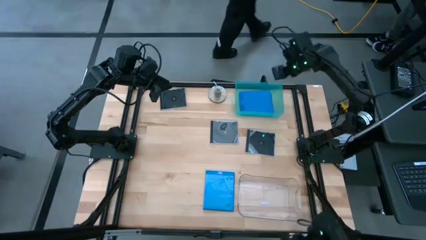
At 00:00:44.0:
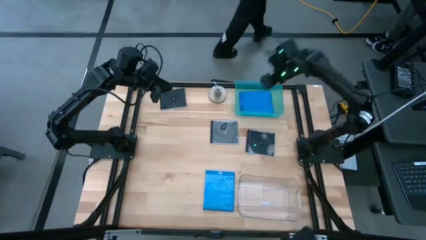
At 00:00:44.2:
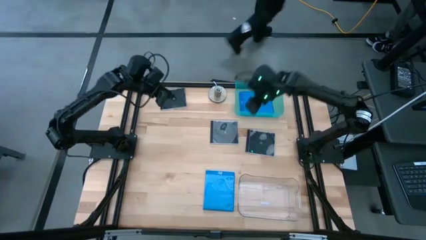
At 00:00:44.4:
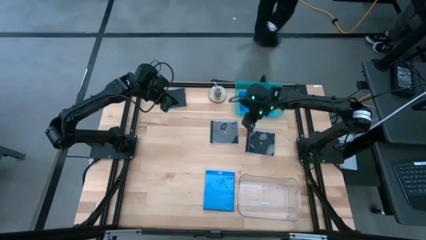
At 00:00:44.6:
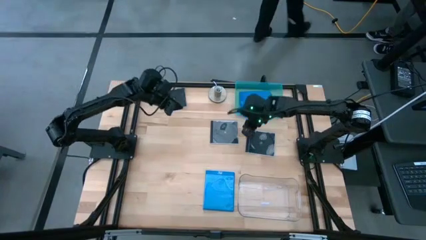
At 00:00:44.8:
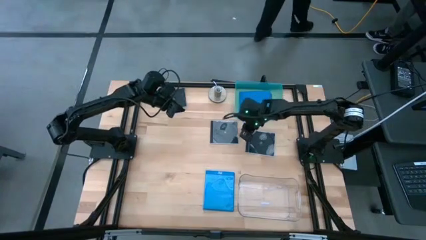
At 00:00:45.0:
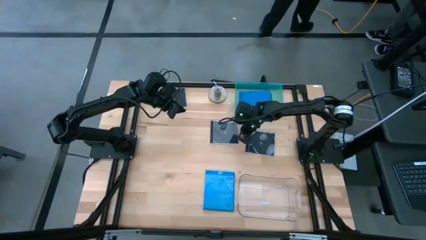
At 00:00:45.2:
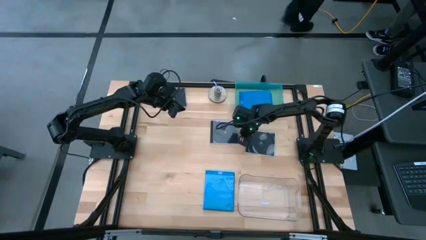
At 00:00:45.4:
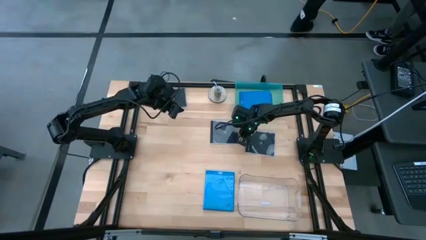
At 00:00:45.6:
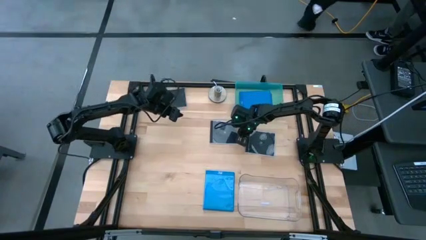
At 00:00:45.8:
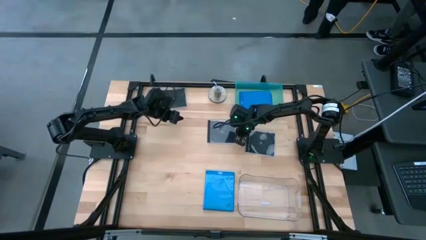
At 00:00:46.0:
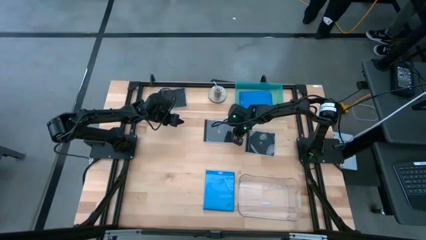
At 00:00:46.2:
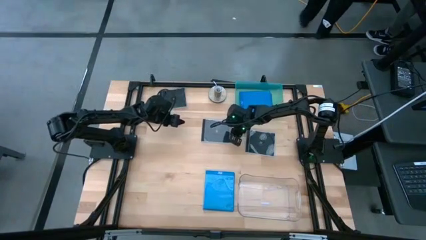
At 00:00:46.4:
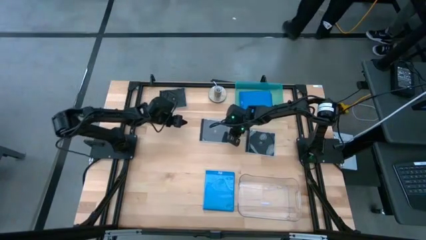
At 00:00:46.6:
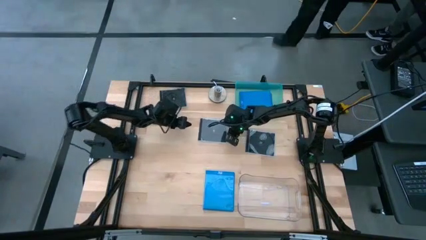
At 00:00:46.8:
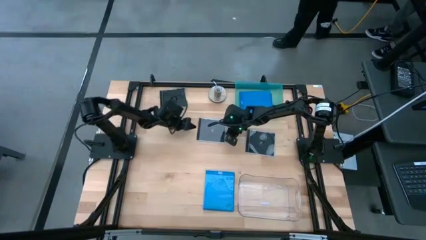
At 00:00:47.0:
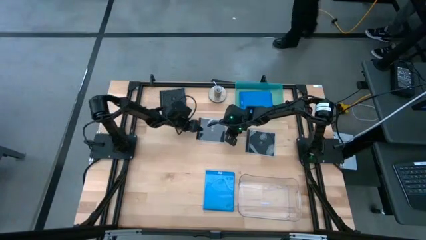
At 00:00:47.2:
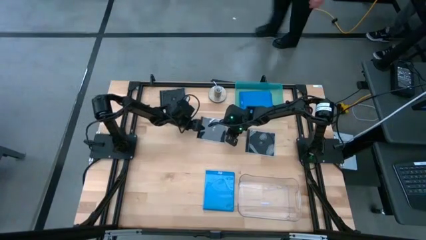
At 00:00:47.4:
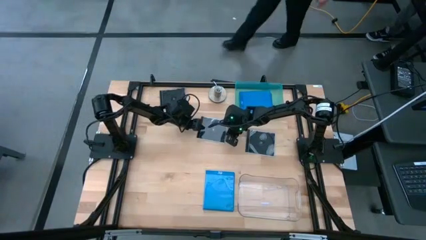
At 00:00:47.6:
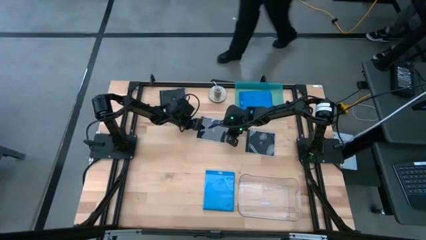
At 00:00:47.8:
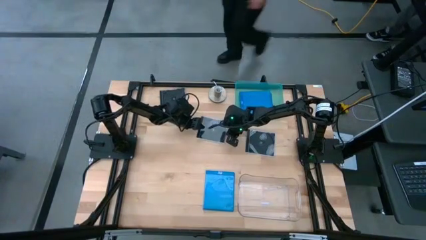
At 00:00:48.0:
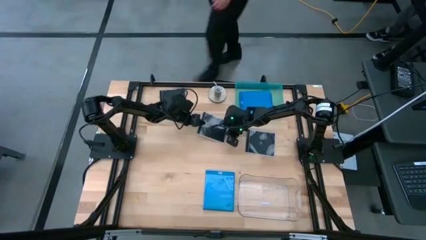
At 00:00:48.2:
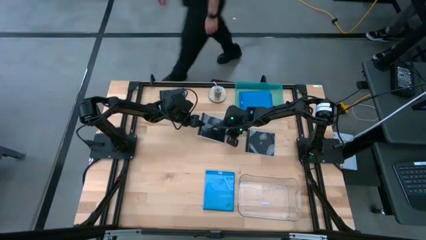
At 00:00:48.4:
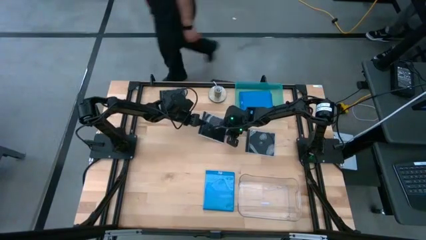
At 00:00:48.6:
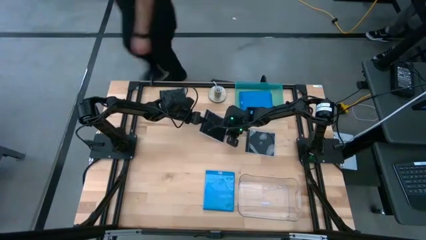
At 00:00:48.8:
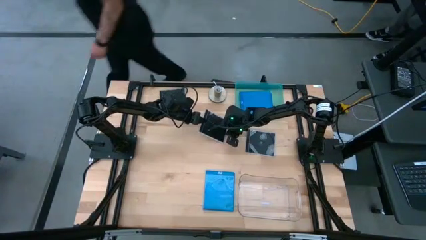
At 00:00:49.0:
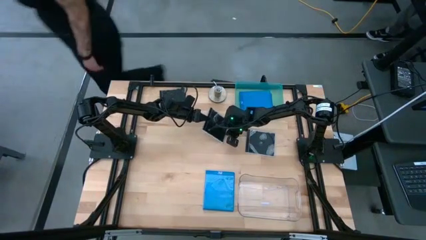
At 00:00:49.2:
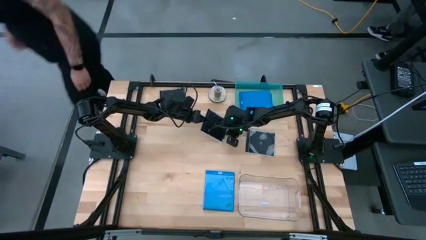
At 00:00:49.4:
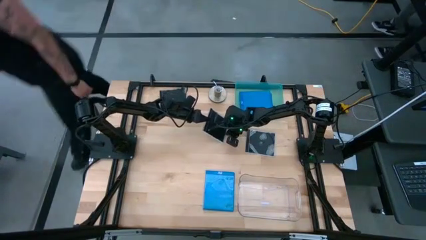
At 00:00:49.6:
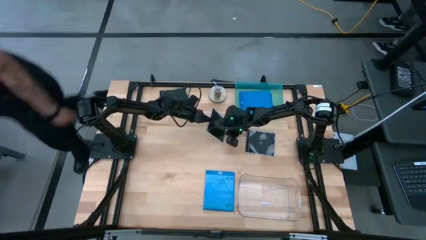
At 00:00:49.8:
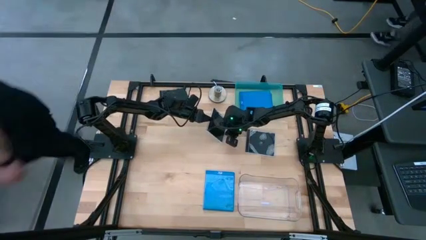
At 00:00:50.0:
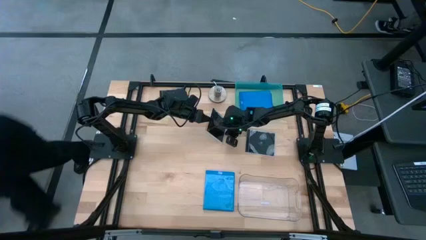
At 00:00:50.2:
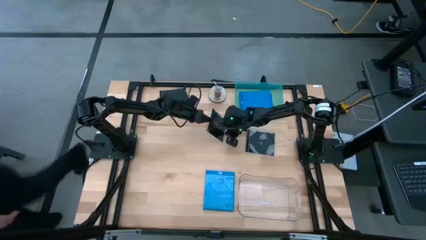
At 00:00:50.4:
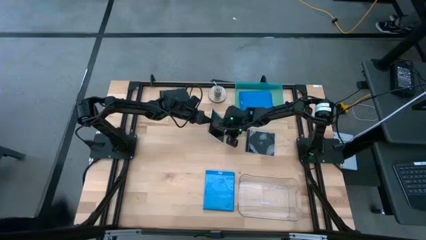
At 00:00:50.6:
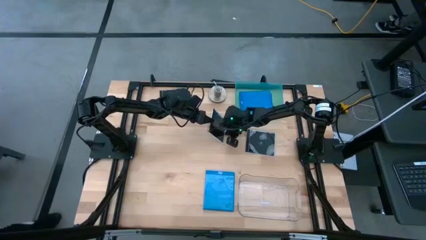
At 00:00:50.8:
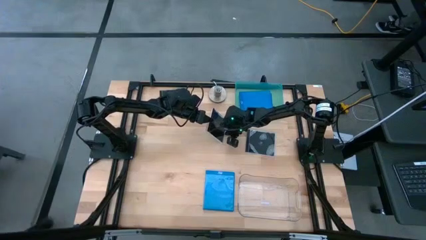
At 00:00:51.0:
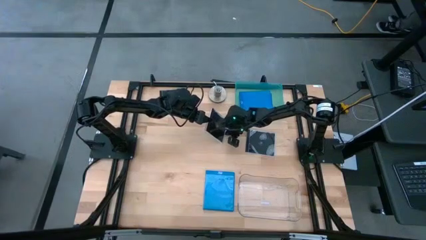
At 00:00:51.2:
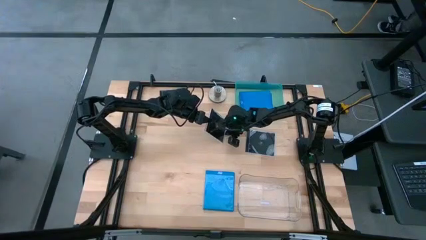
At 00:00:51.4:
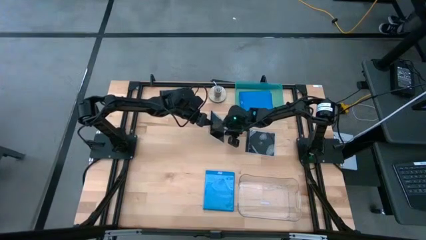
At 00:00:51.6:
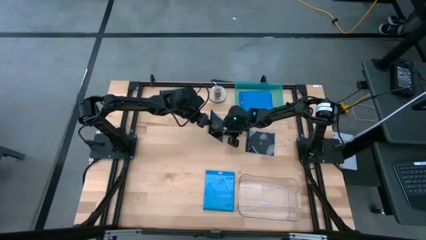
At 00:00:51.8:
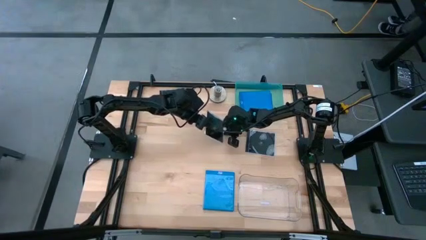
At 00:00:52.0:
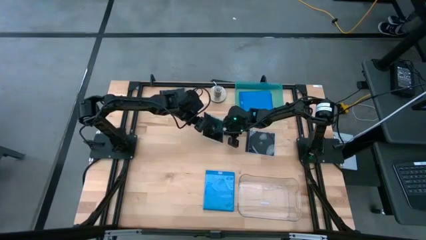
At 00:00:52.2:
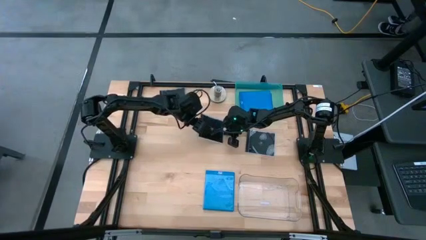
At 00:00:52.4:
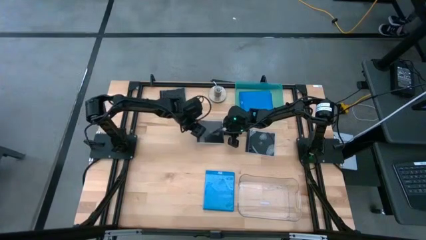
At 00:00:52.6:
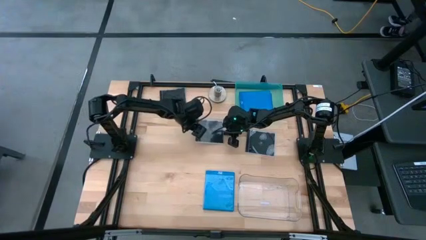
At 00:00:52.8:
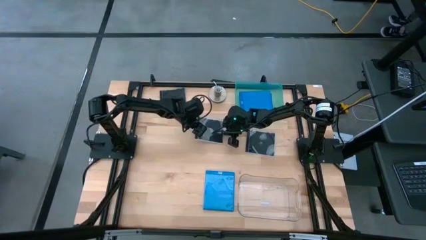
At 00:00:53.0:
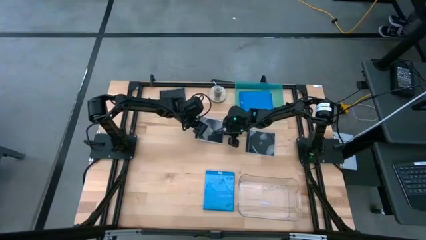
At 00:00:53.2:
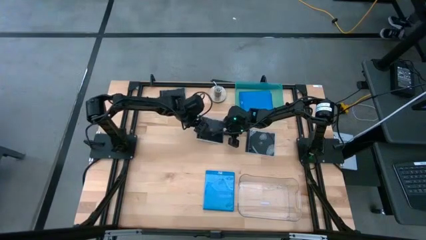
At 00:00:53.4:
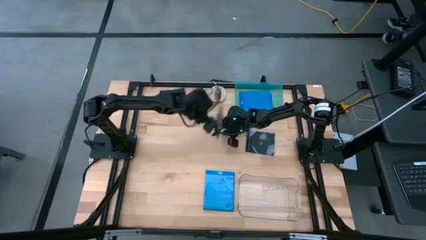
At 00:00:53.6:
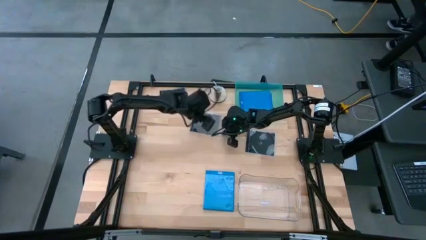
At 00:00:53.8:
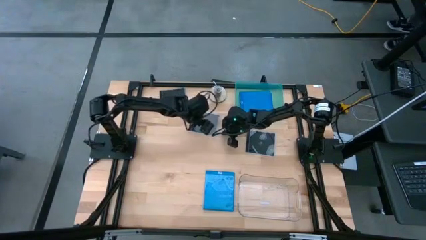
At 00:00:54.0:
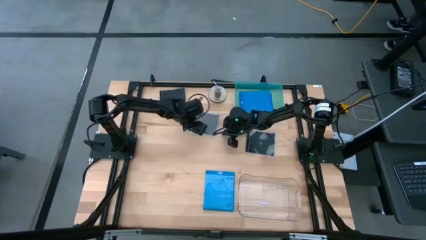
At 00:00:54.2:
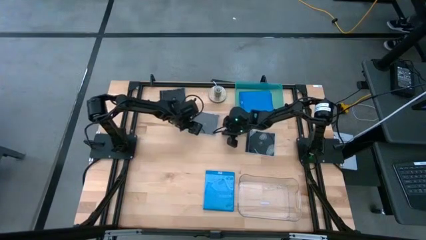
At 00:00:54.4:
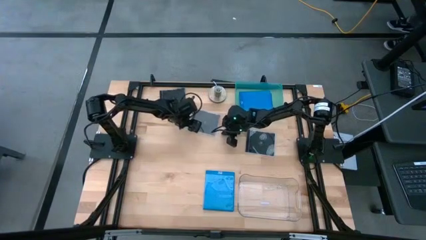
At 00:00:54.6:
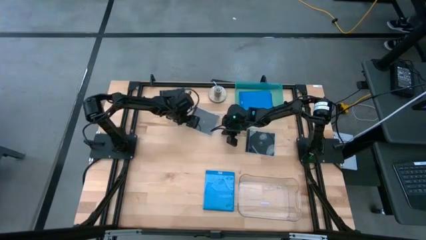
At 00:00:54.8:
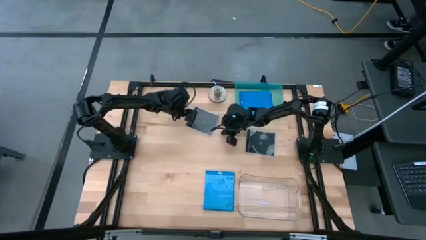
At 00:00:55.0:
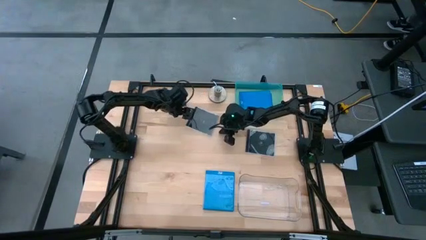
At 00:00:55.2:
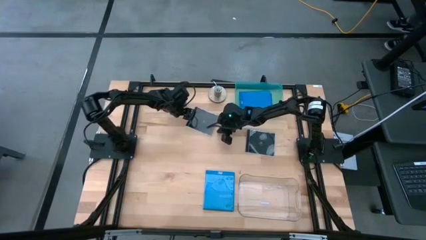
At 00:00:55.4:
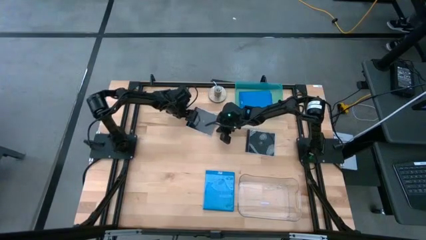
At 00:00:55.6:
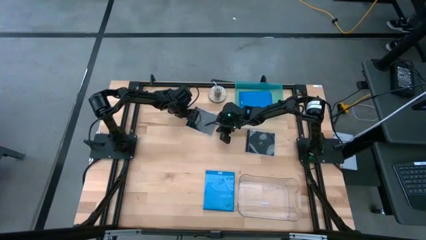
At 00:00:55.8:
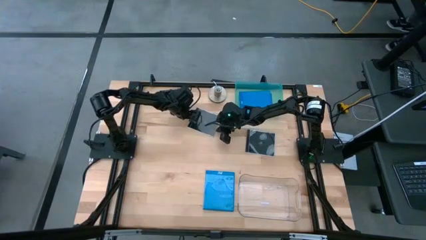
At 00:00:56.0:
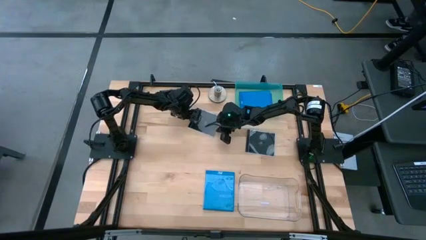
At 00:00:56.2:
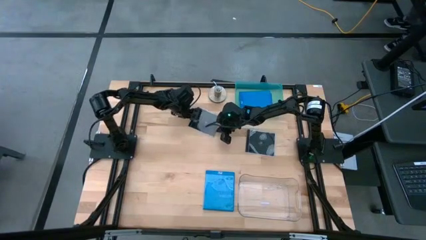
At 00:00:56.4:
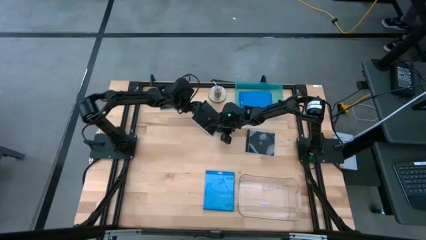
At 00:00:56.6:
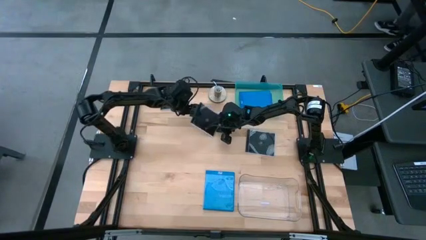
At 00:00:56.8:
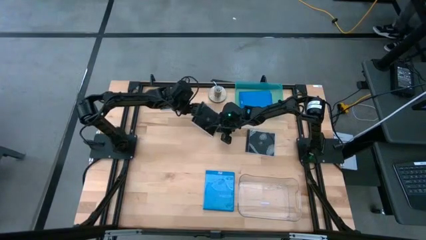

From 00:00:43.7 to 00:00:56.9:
Task: Pick & place jewel cases by type
Put the middle black CD case into the transparent bin
